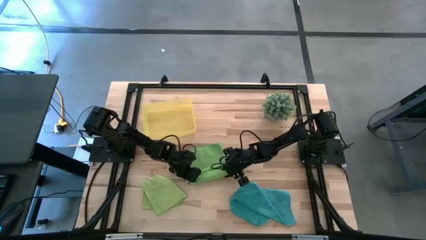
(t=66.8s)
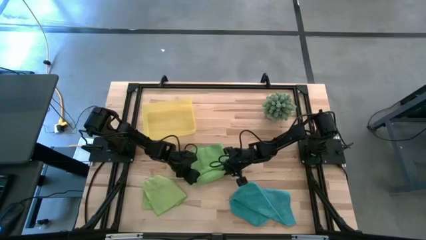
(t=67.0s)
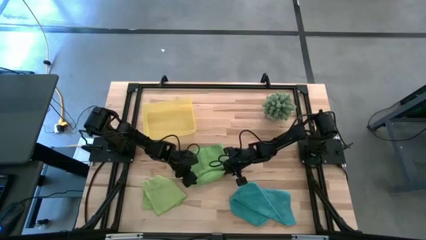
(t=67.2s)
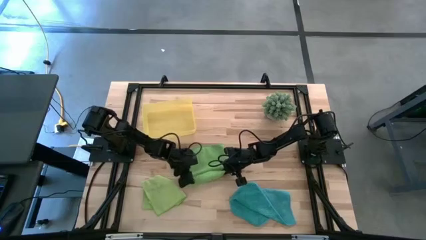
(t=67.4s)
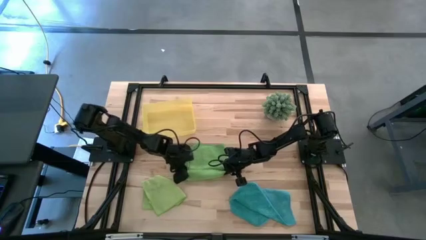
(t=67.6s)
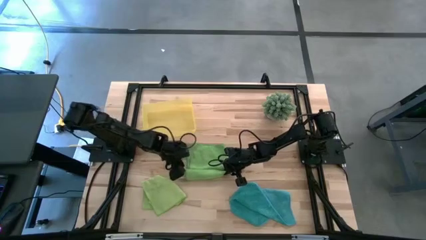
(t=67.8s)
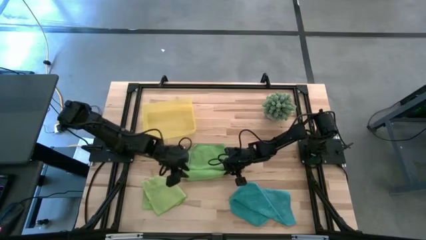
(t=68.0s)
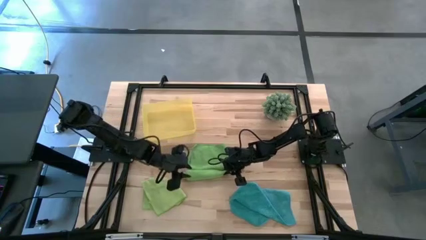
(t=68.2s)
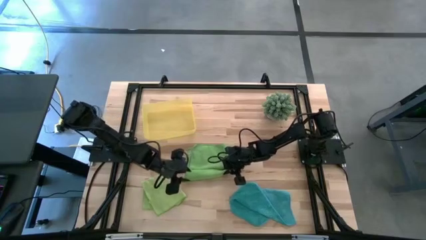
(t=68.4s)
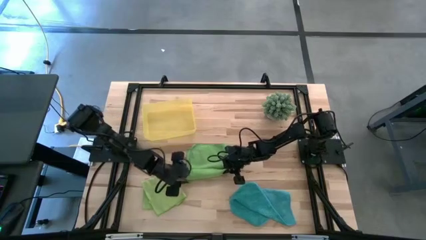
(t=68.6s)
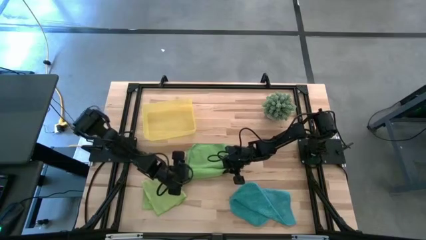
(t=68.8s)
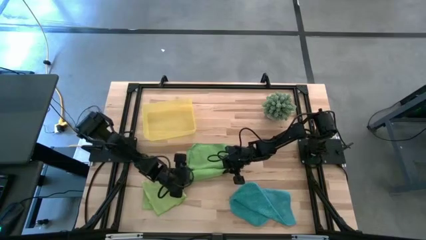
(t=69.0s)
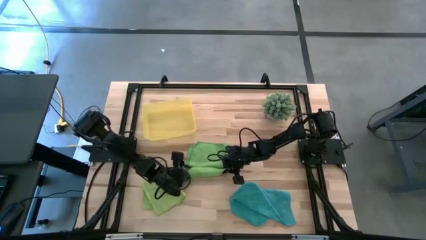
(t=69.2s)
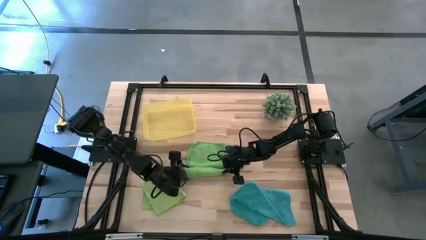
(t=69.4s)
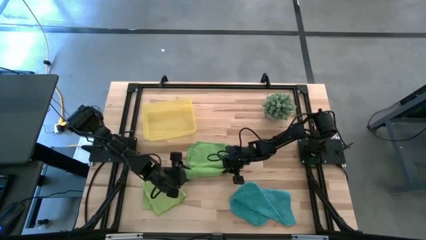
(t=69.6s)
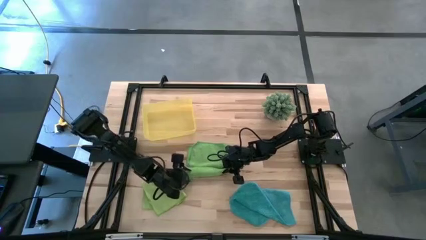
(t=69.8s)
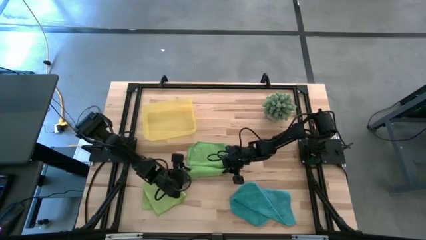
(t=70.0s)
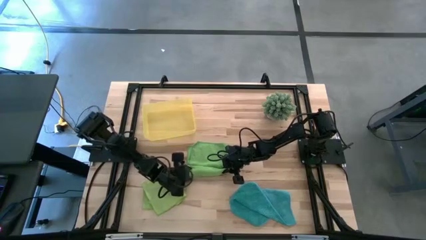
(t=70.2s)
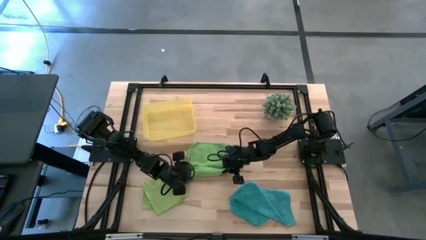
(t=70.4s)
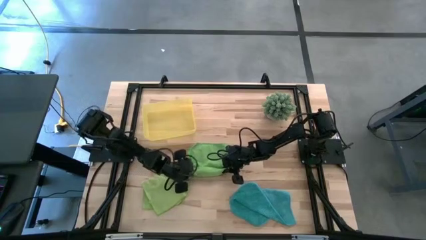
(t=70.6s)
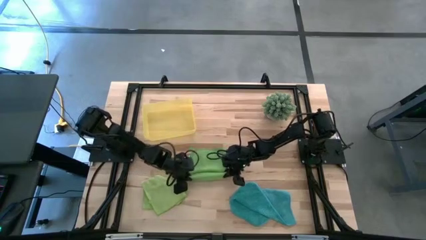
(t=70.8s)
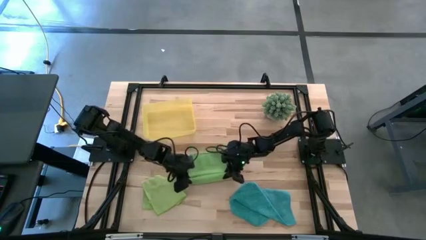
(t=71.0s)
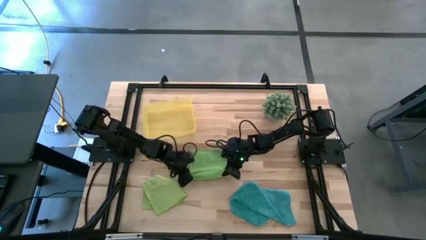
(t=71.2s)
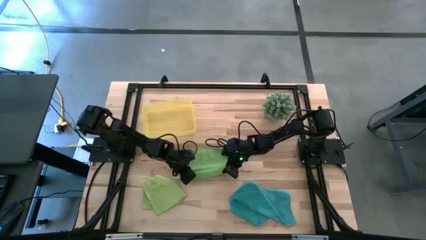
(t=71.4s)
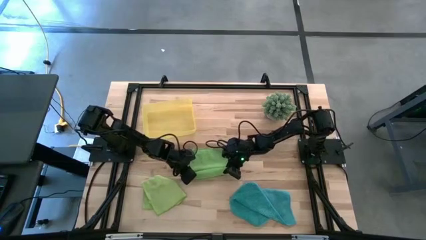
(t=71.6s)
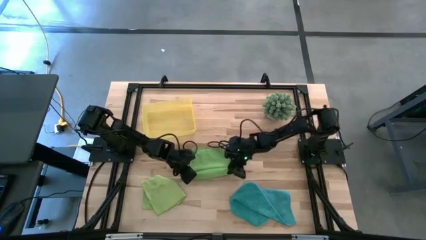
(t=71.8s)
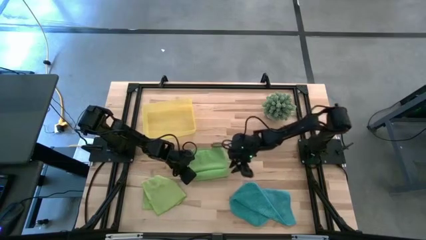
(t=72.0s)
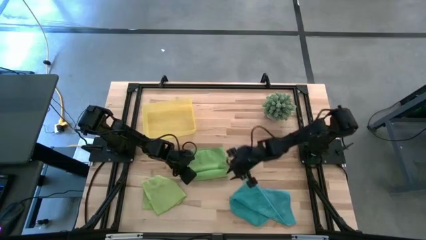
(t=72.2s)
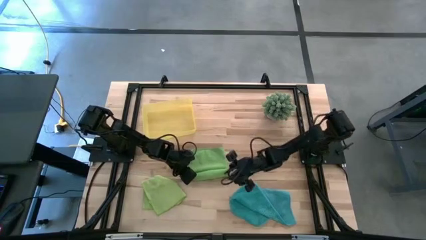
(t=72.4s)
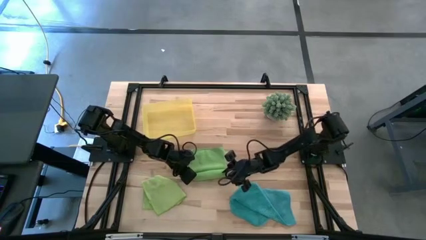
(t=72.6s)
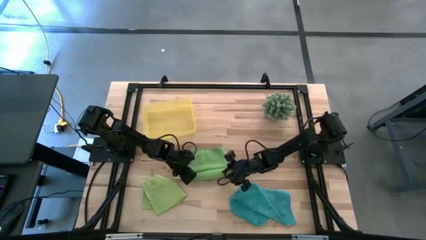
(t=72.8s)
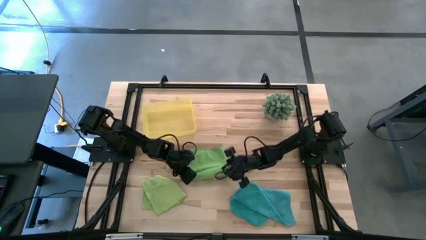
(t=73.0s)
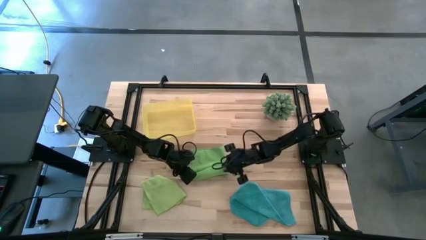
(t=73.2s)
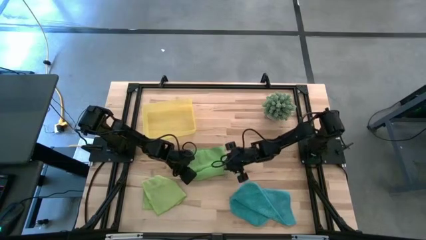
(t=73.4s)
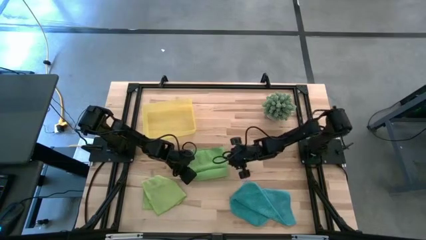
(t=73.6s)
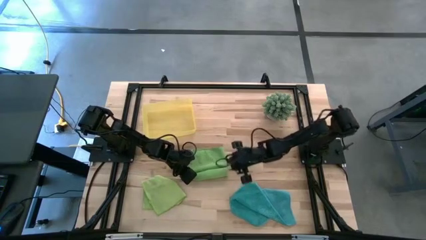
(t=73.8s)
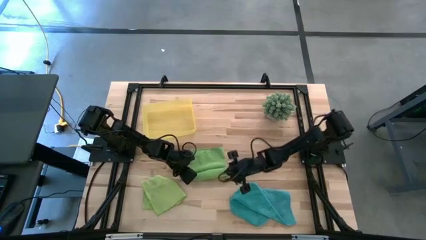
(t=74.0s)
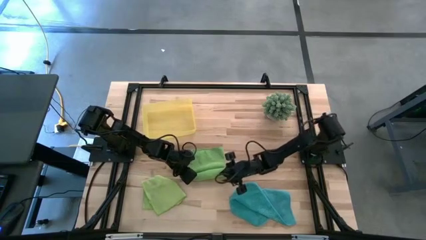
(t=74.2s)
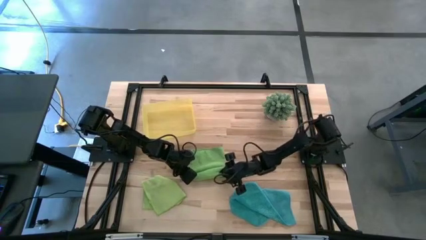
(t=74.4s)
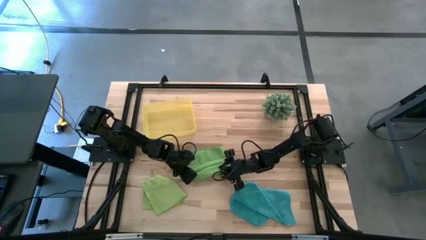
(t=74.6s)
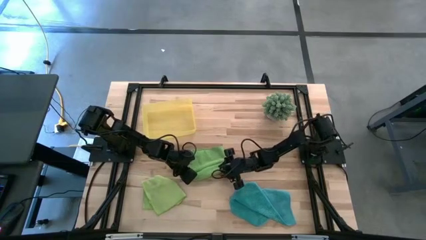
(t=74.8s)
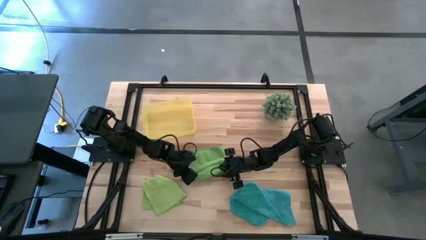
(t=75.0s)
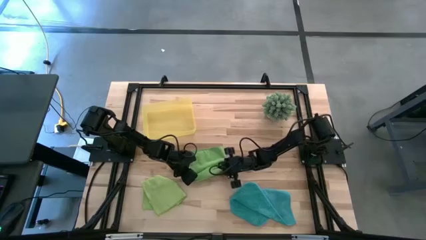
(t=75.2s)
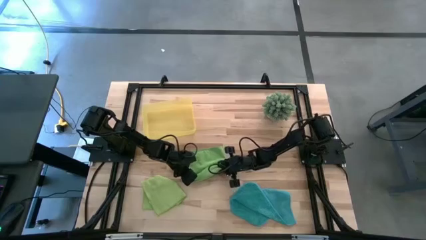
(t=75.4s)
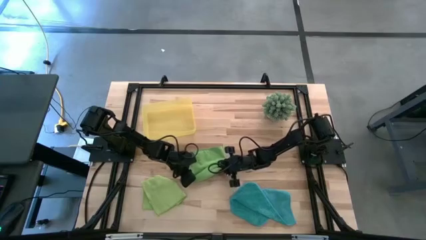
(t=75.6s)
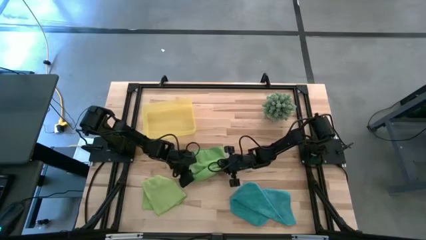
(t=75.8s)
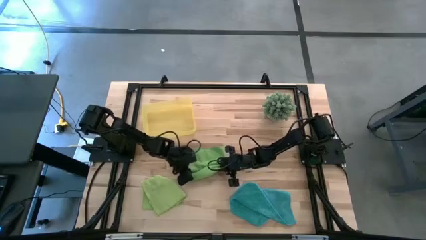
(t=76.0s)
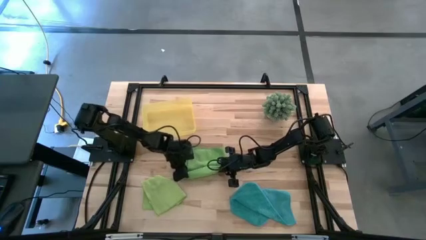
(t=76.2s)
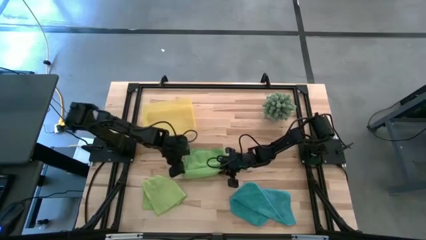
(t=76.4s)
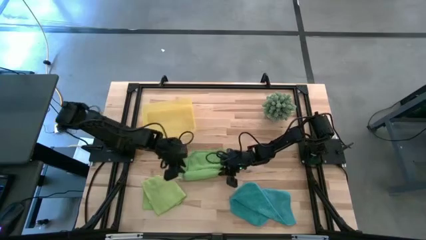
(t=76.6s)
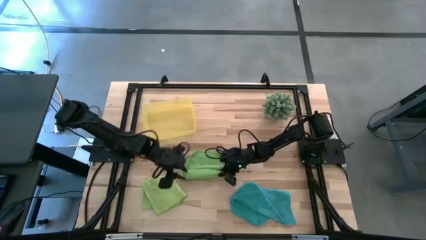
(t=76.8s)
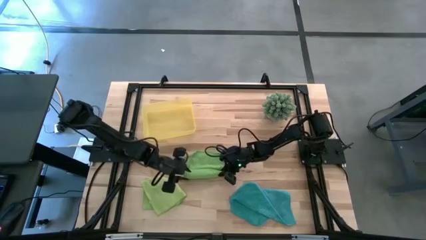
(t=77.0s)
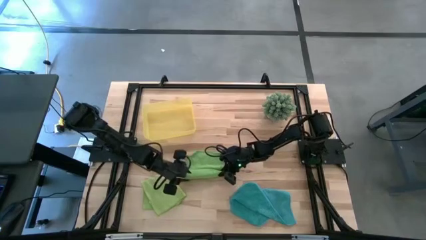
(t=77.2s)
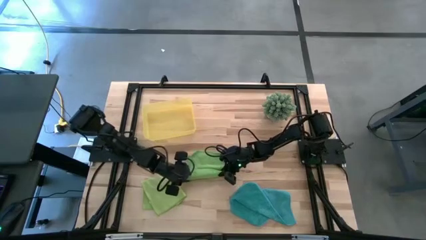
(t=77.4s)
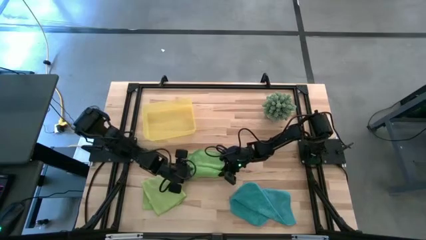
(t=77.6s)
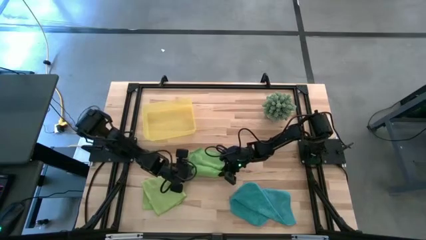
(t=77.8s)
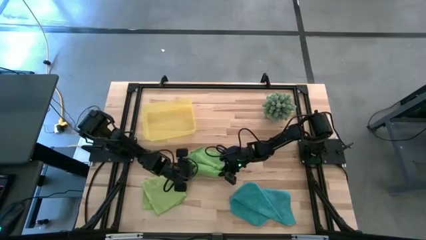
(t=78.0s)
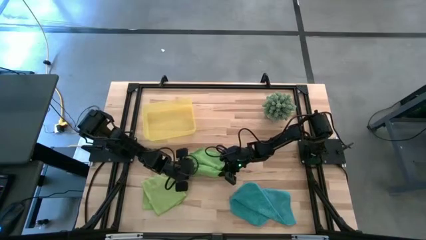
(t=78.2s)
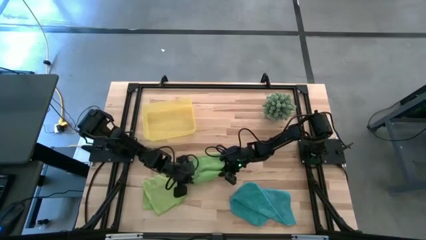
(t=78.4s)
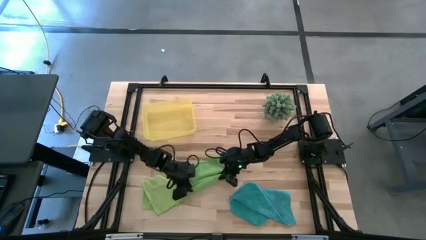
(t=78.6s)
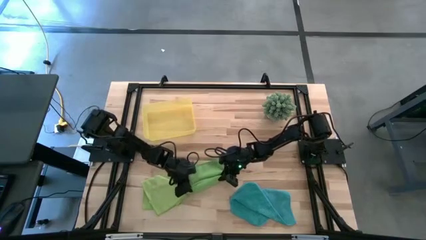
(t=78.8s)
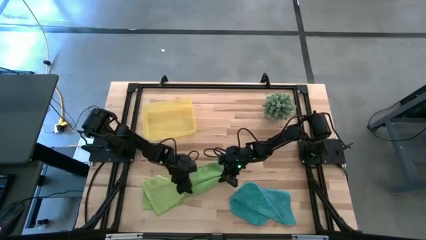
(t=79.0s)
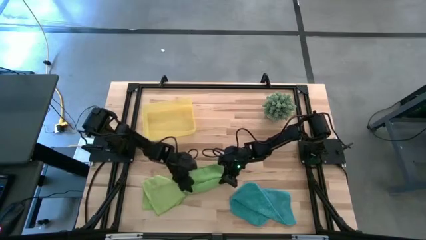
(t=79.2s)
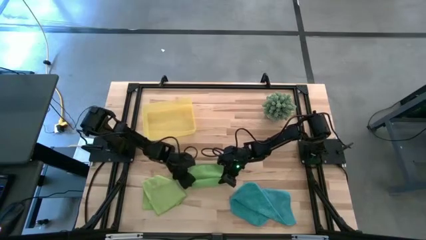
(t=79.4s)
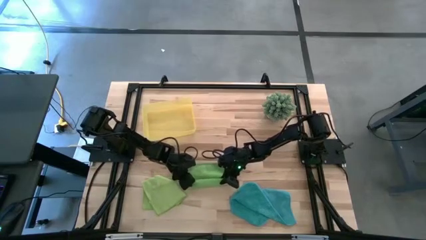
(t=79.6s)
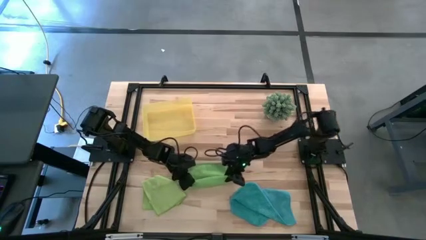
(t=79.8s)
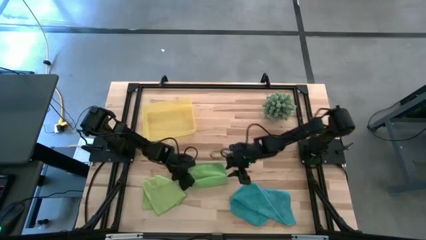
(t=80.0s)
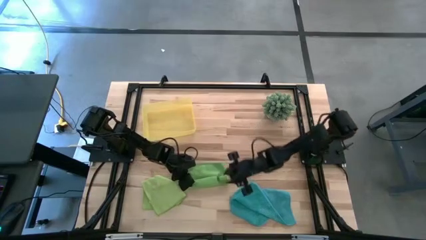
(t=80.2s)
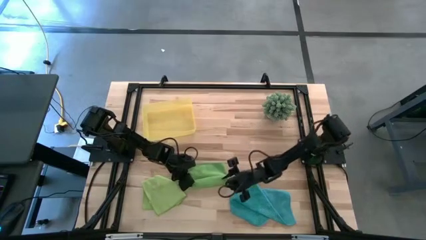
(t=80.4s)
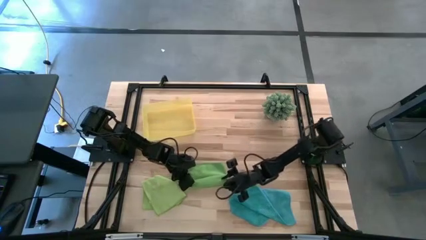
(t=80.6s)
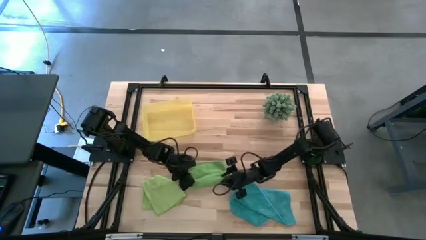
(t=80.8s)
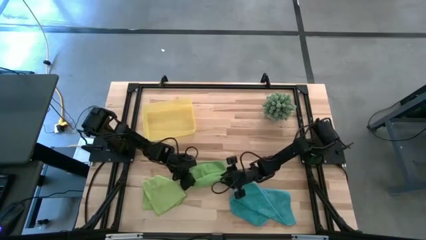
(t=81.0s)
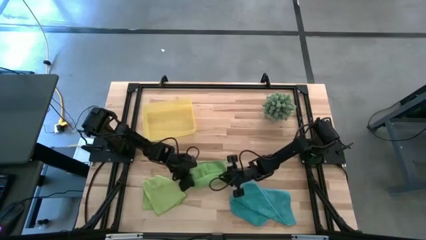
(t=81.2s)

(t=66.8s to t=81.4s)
Task: Roll microfiber towels into tight, uniform cylinder then place into a basket
Roll the green microfiber towel
